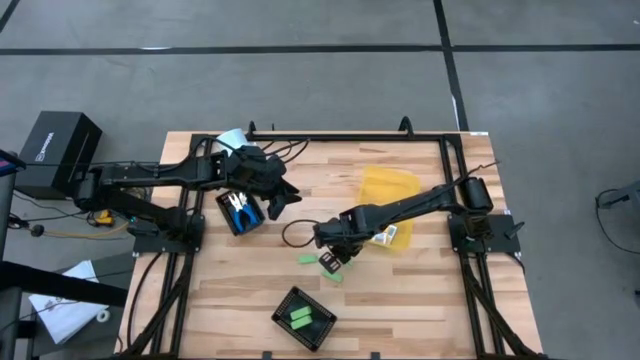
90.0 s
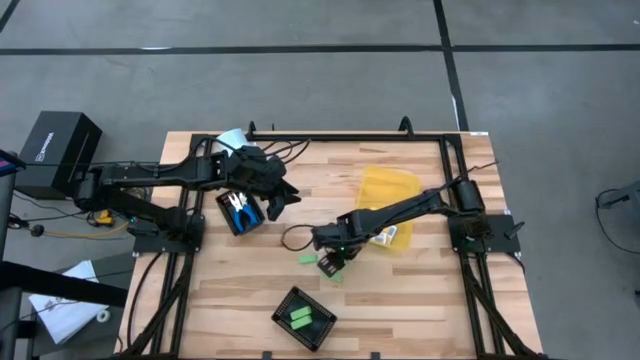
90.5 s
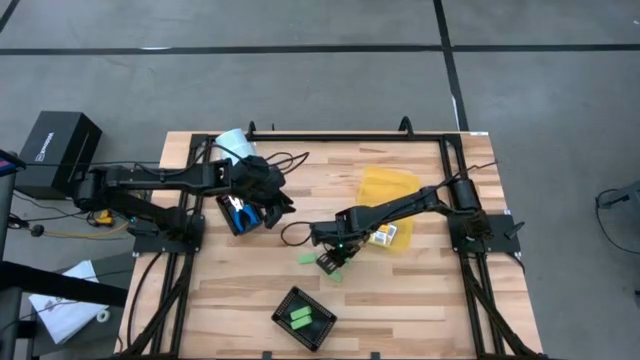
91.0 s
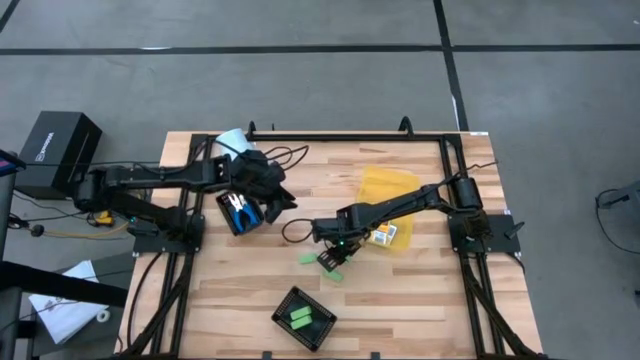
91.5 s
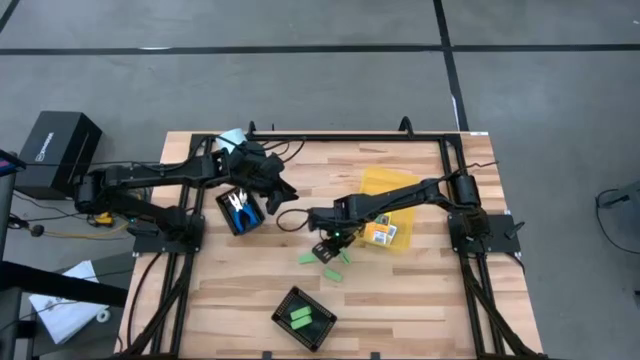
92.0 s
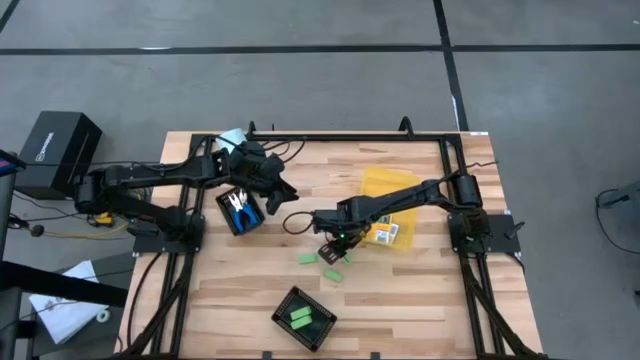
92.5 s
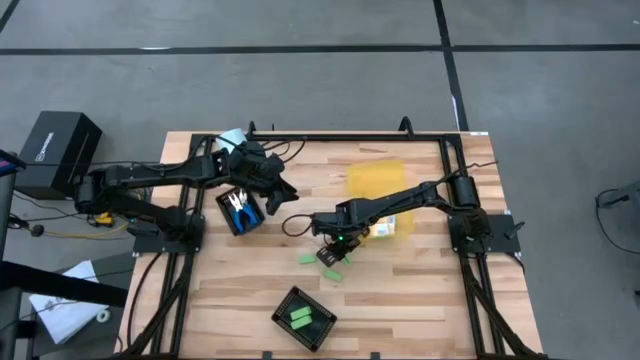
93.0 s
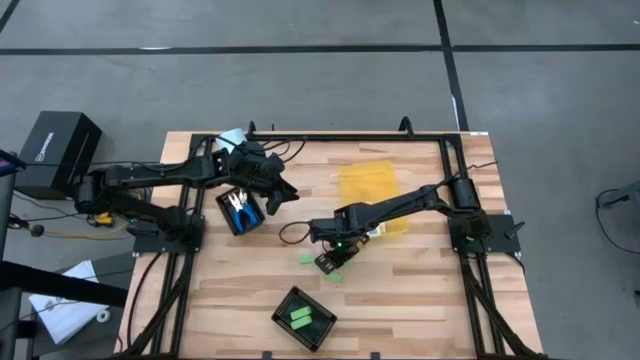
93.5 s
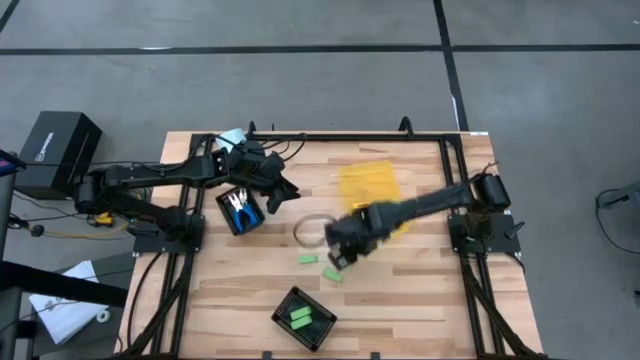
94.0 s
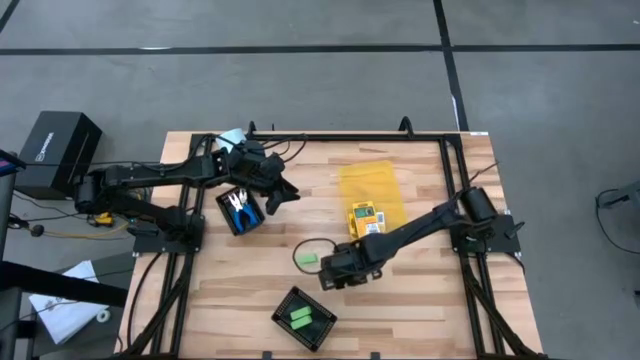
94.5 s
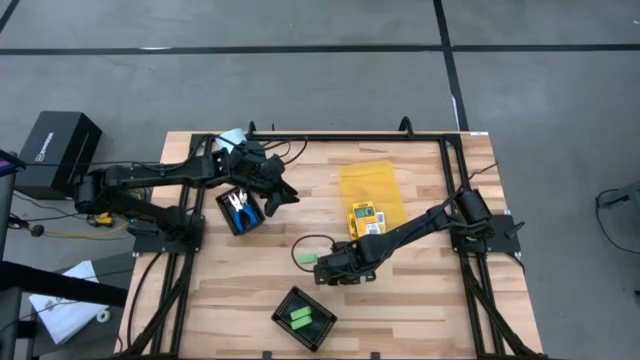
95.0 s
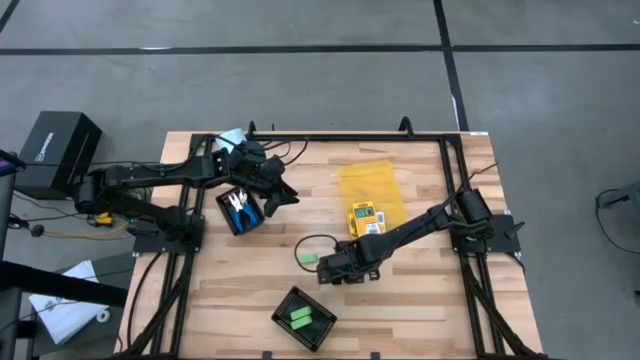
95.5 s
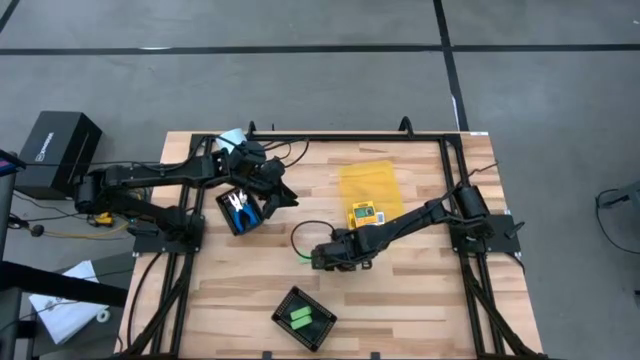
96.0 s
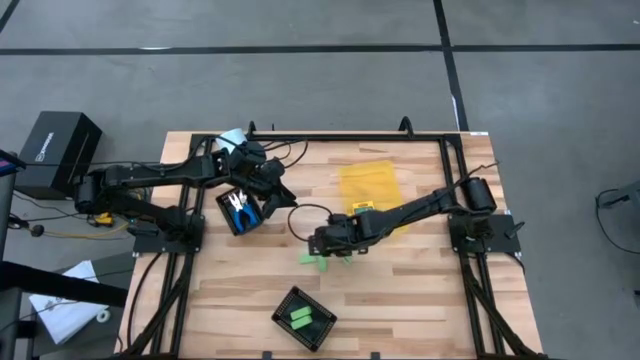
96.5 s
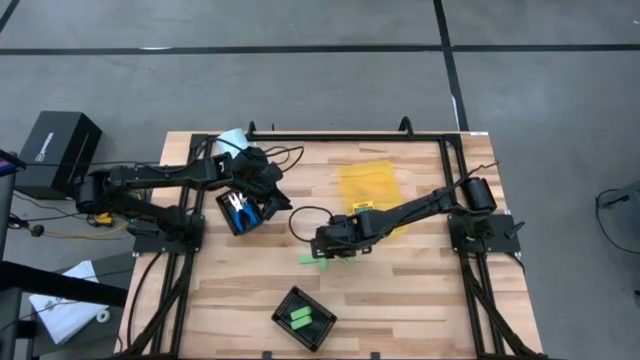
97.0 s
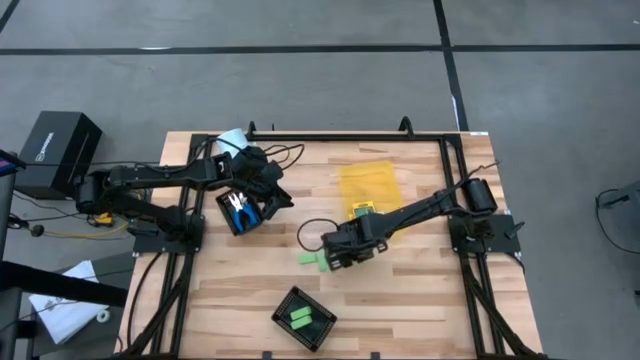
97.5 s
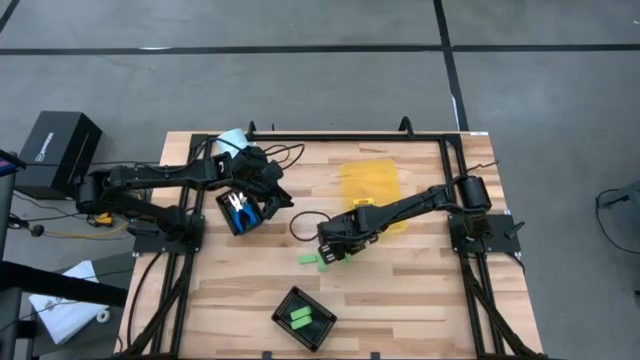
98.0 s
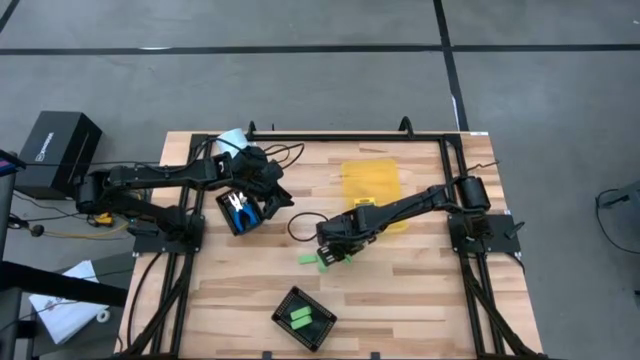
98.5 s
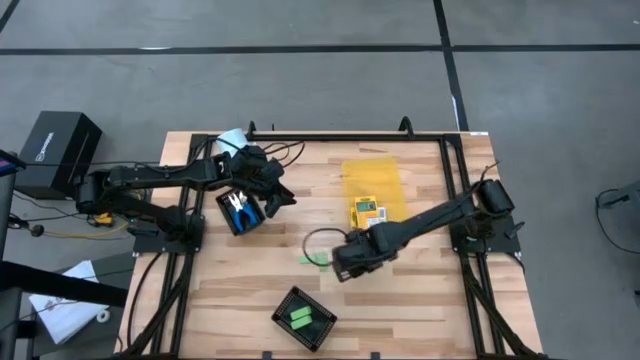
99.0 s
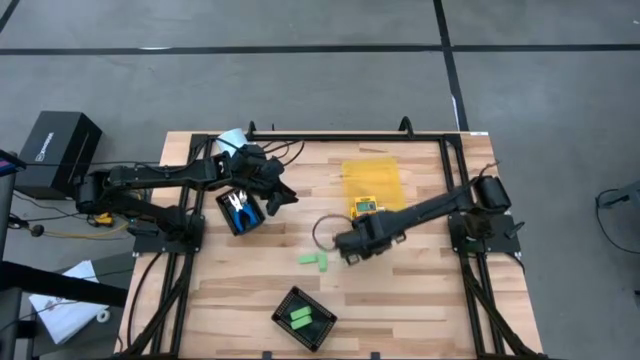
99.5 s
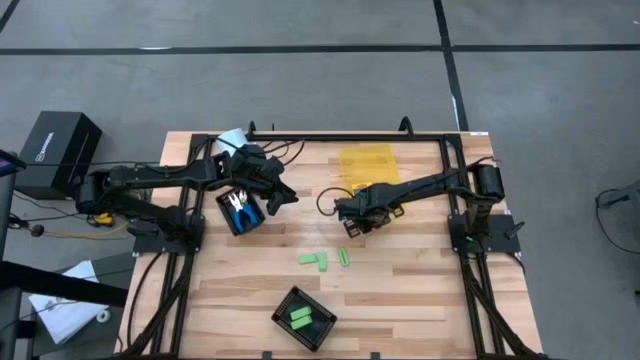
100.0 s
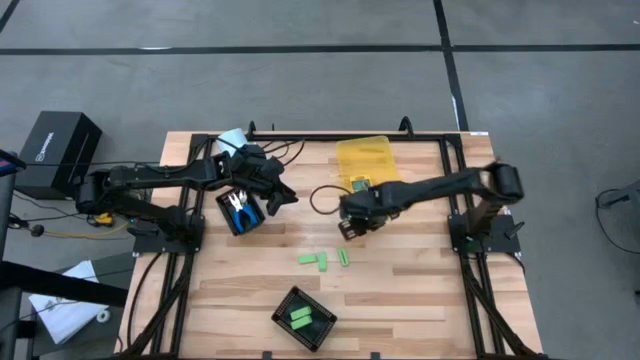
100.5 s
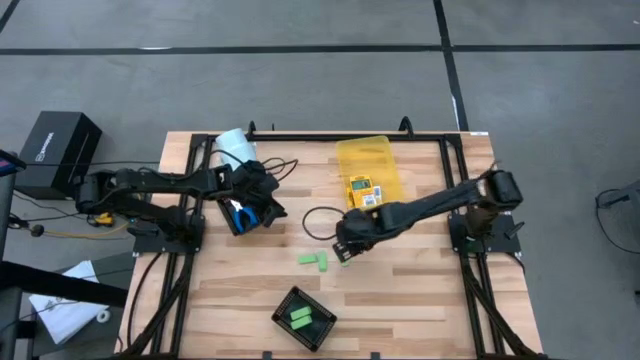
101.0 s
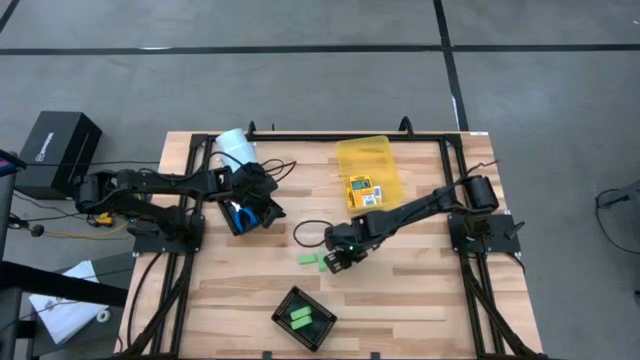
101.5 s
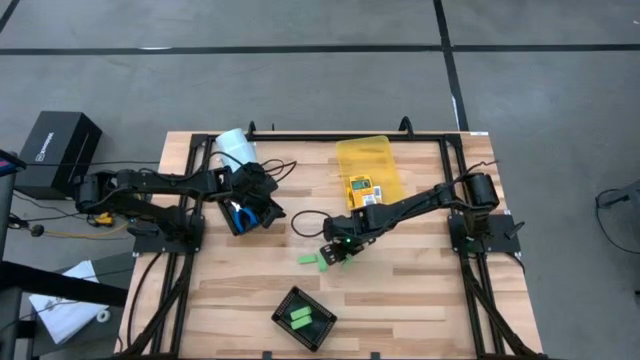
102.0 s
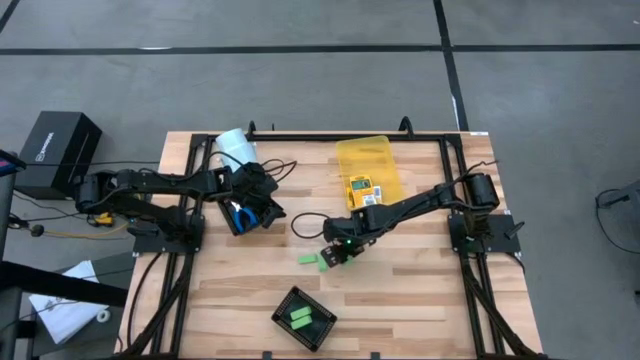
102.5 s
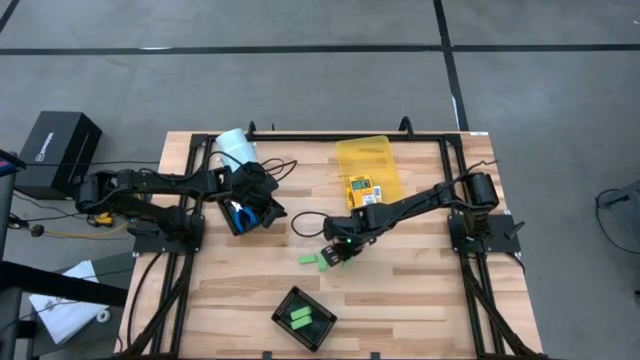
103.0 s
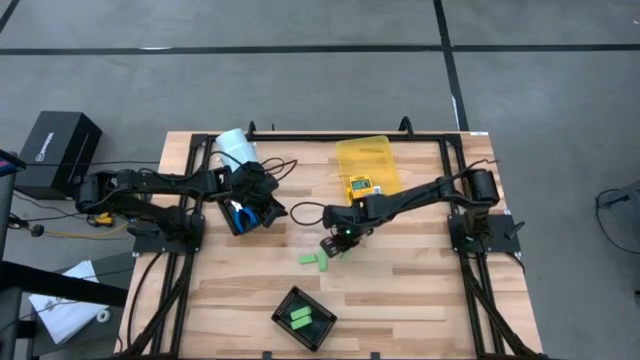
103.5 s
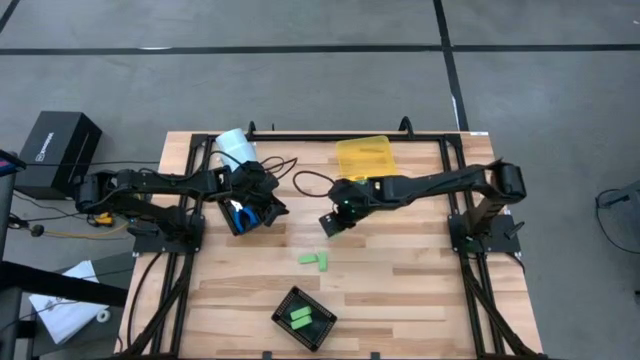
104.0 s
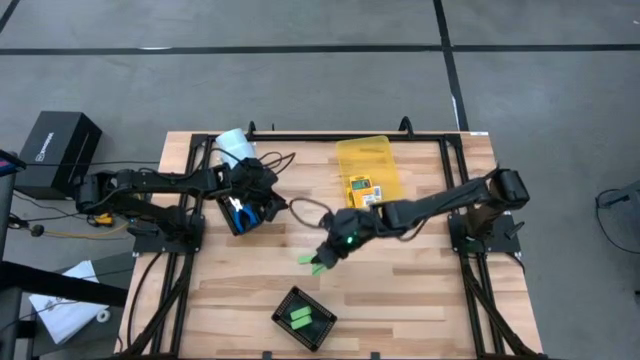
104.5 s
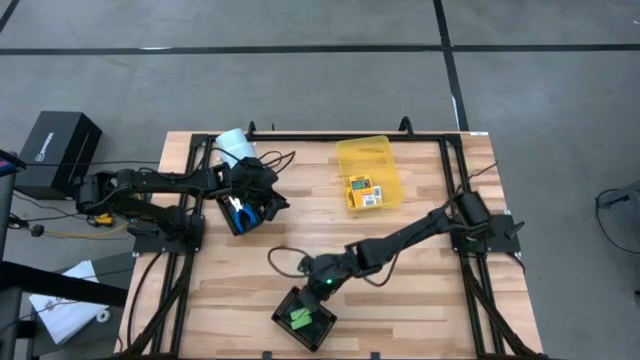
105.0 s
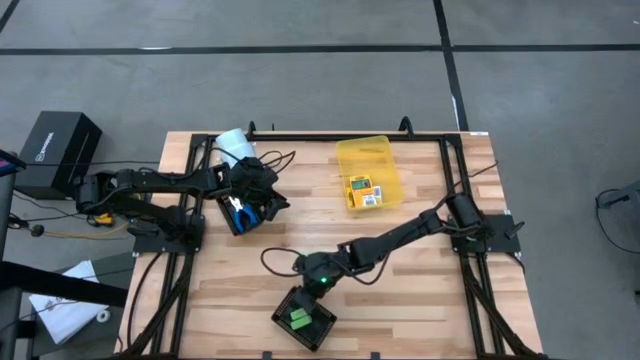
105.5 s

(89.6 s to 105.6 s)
Task: Pick & Place School Supplies
Put the green eraser into the bottom black bin
